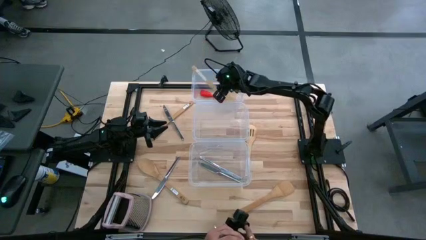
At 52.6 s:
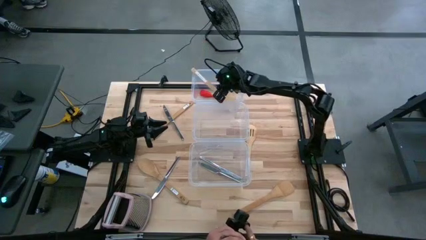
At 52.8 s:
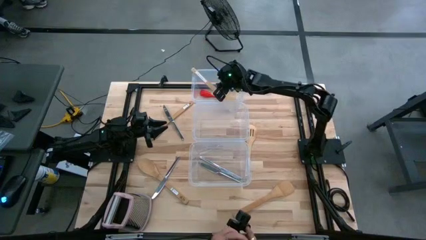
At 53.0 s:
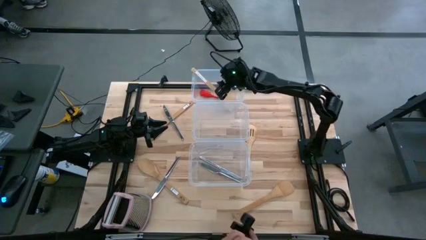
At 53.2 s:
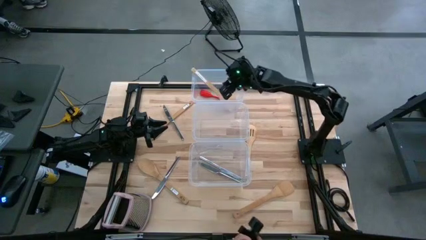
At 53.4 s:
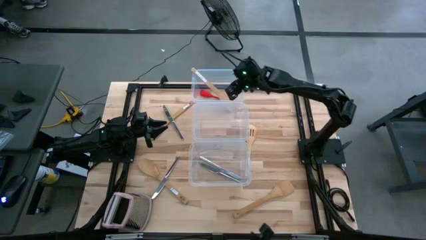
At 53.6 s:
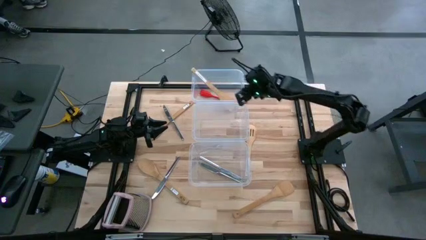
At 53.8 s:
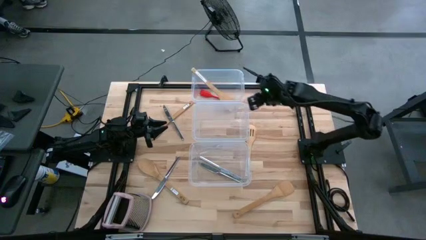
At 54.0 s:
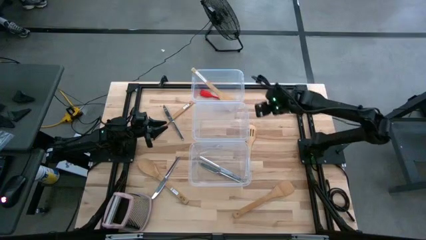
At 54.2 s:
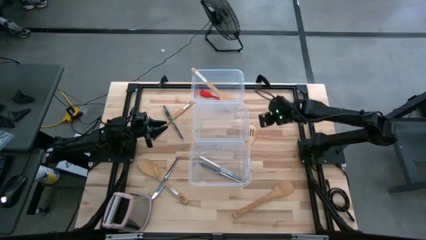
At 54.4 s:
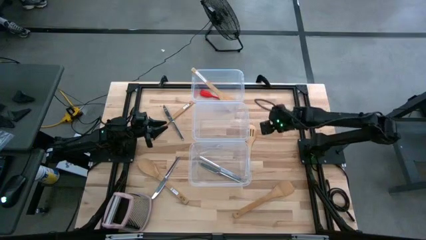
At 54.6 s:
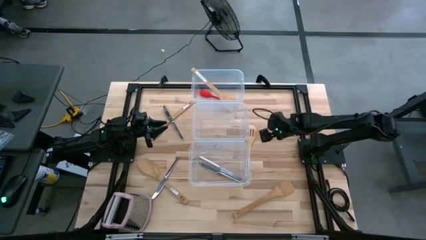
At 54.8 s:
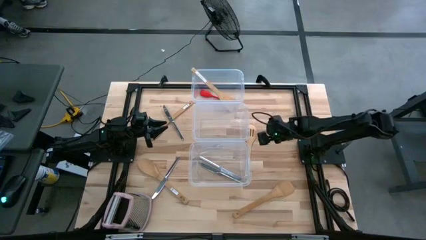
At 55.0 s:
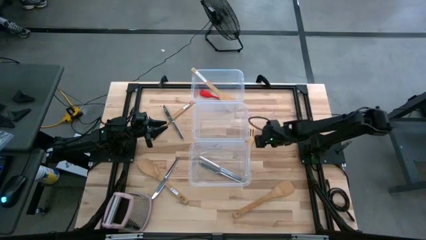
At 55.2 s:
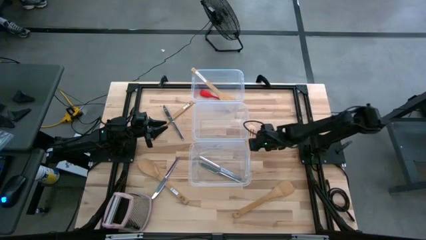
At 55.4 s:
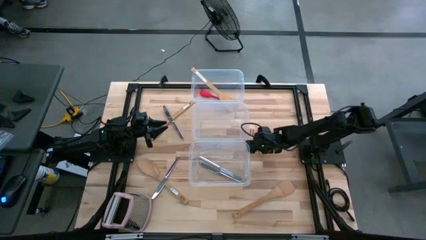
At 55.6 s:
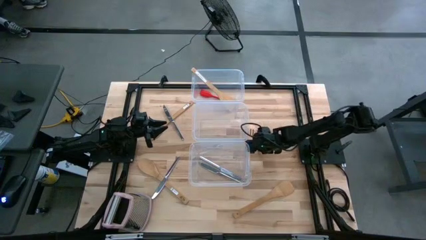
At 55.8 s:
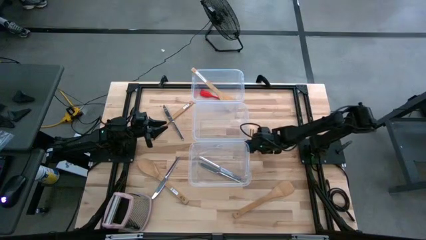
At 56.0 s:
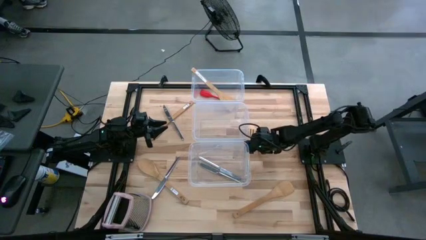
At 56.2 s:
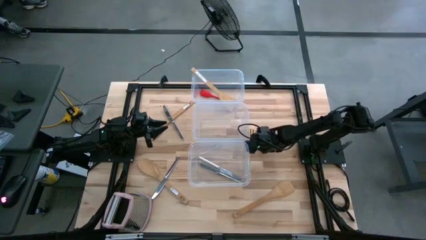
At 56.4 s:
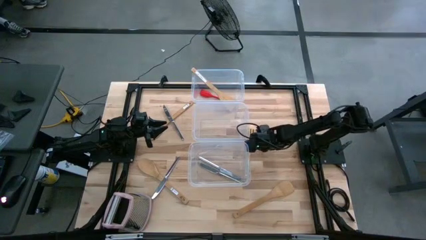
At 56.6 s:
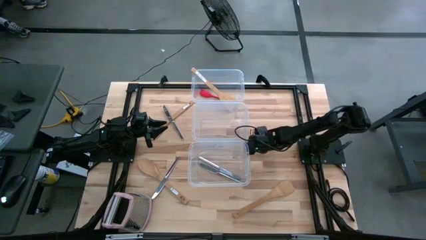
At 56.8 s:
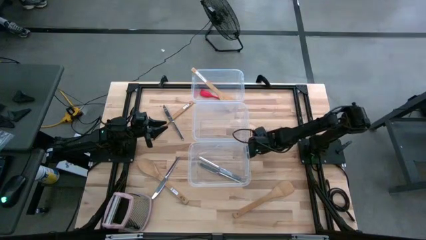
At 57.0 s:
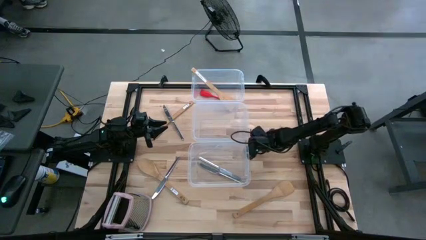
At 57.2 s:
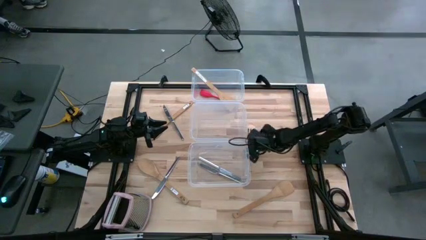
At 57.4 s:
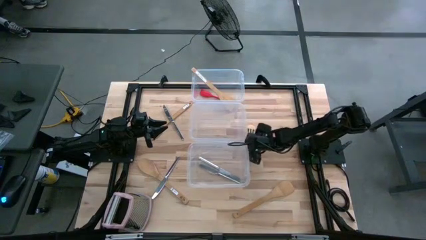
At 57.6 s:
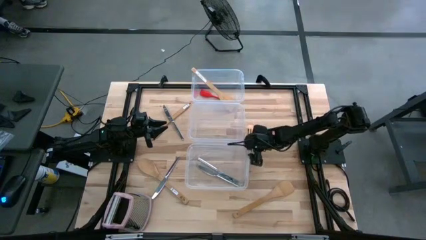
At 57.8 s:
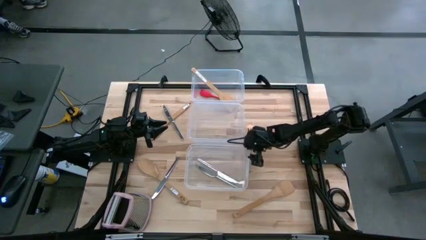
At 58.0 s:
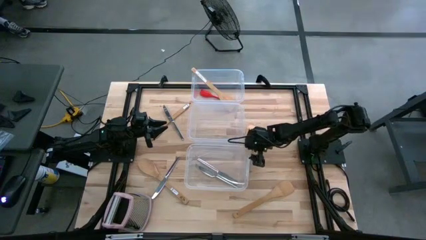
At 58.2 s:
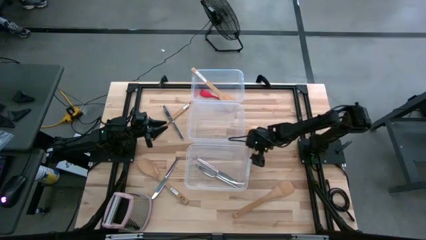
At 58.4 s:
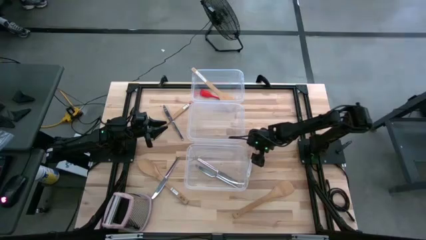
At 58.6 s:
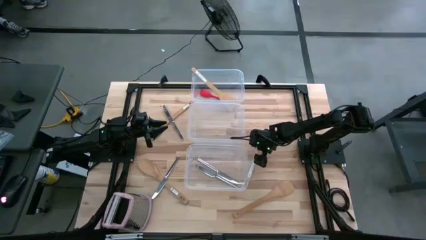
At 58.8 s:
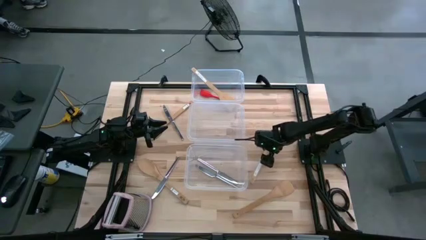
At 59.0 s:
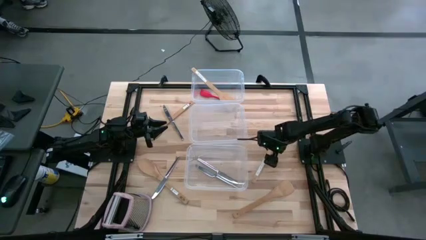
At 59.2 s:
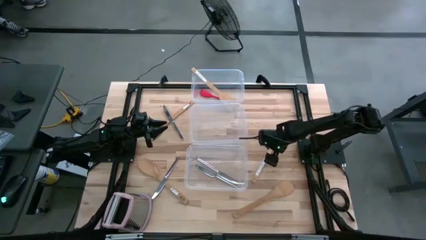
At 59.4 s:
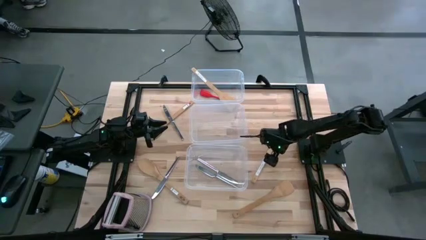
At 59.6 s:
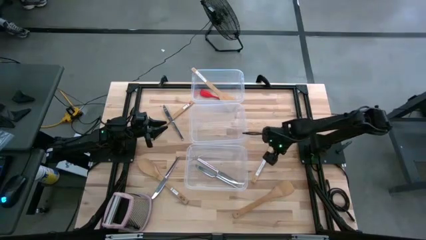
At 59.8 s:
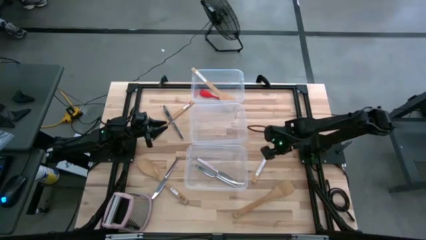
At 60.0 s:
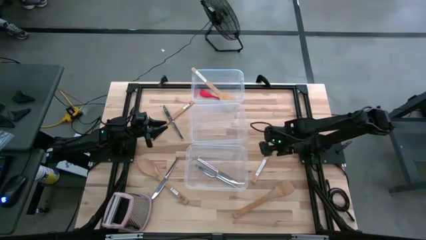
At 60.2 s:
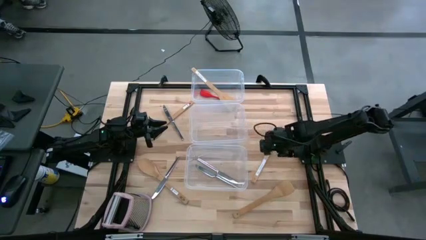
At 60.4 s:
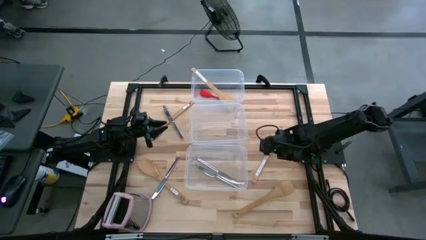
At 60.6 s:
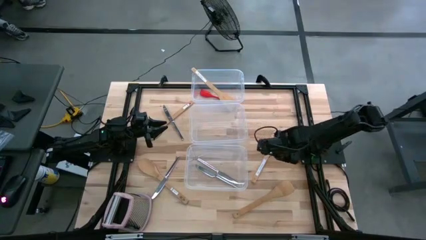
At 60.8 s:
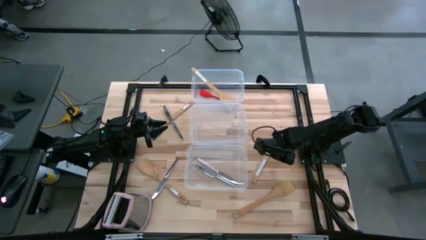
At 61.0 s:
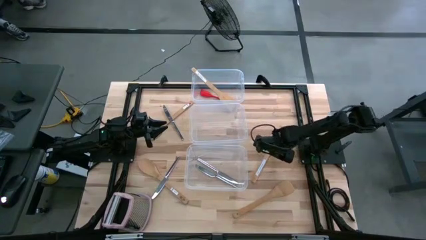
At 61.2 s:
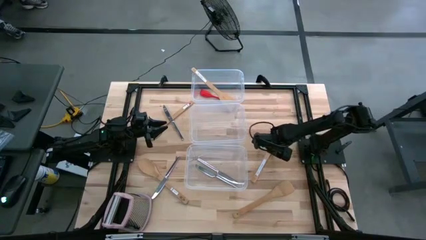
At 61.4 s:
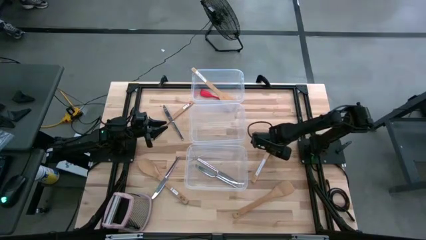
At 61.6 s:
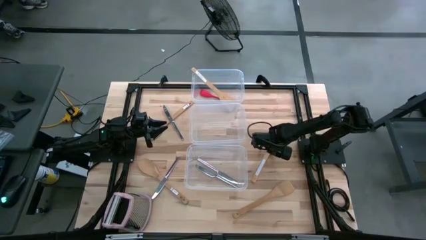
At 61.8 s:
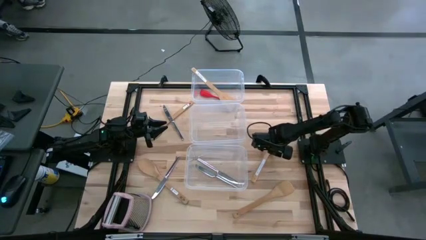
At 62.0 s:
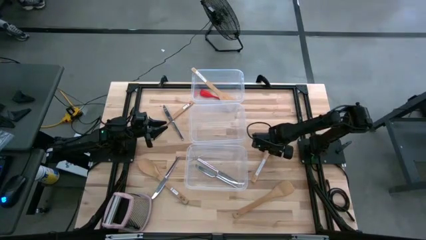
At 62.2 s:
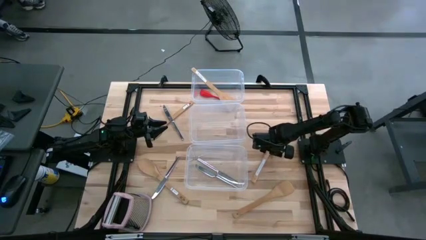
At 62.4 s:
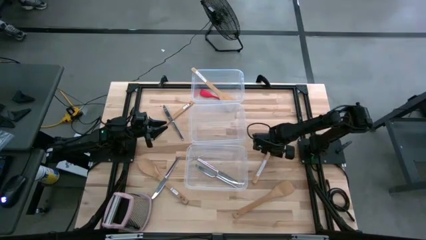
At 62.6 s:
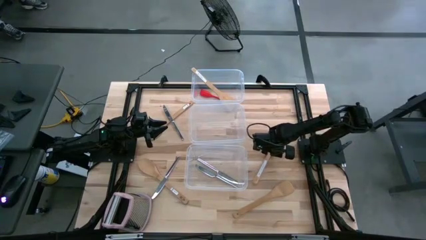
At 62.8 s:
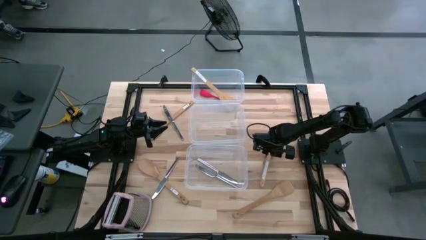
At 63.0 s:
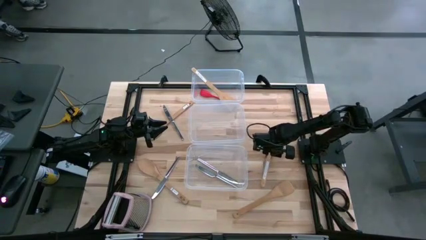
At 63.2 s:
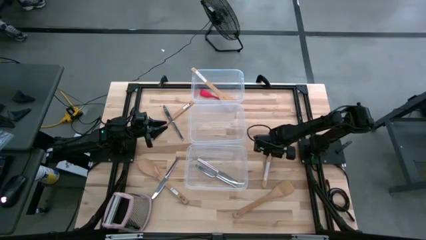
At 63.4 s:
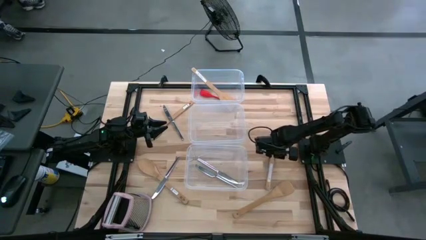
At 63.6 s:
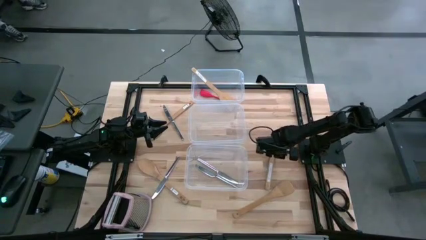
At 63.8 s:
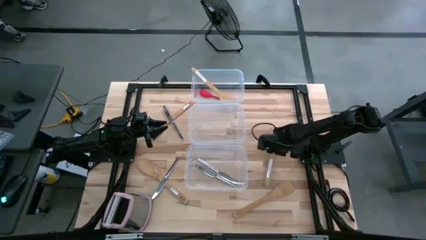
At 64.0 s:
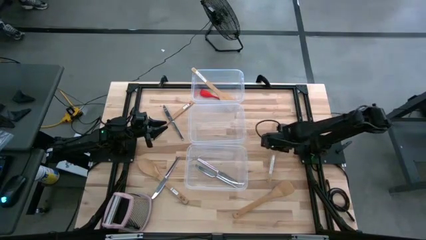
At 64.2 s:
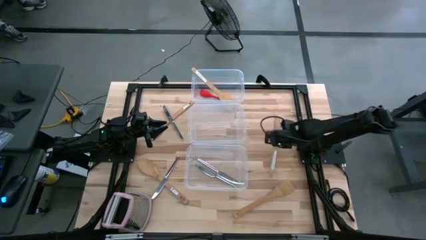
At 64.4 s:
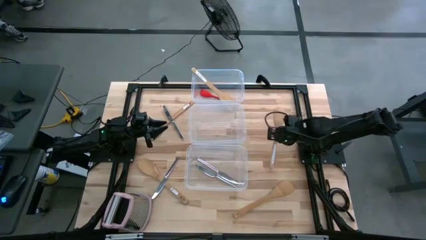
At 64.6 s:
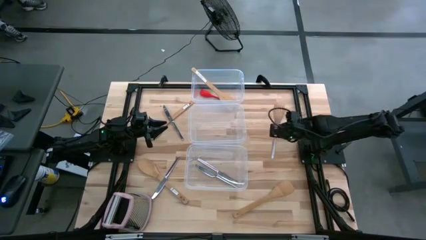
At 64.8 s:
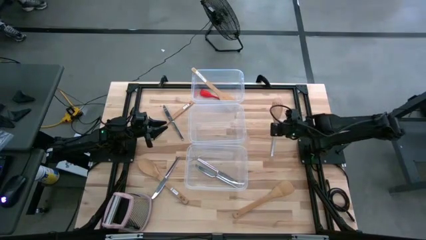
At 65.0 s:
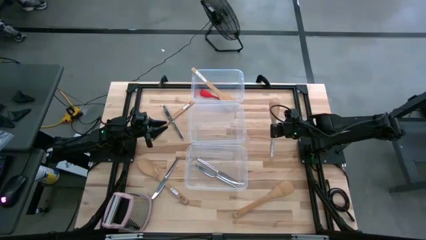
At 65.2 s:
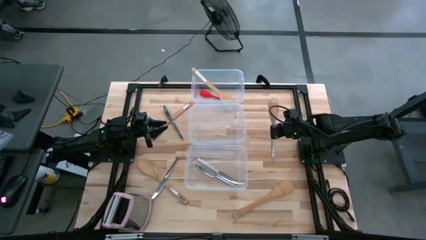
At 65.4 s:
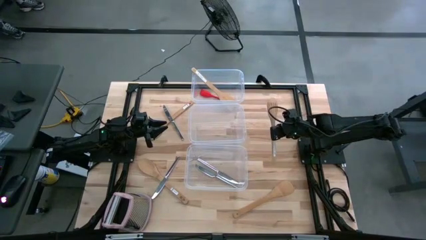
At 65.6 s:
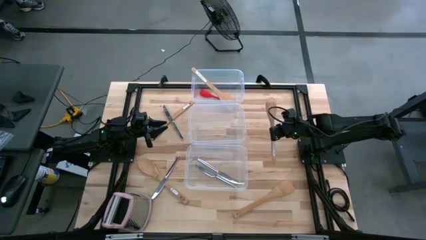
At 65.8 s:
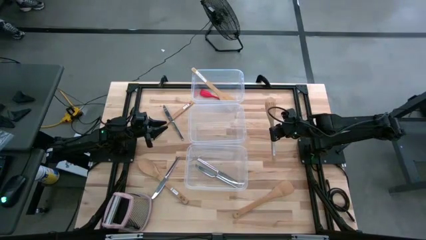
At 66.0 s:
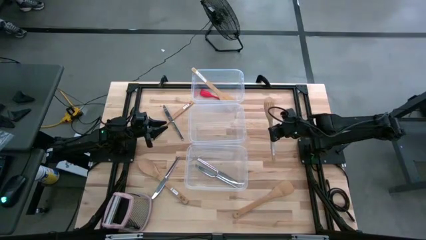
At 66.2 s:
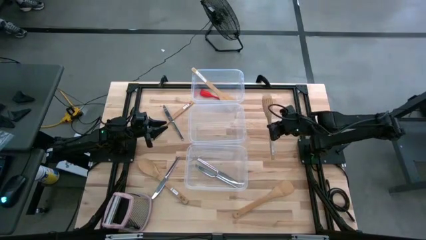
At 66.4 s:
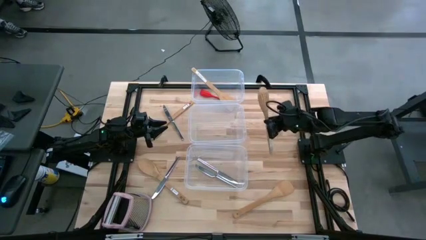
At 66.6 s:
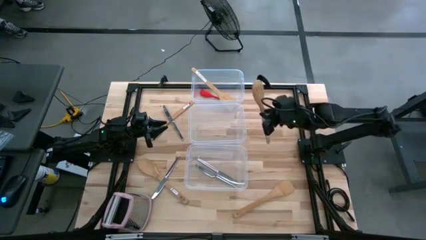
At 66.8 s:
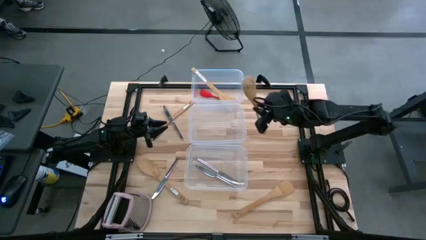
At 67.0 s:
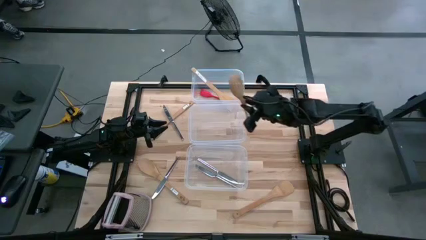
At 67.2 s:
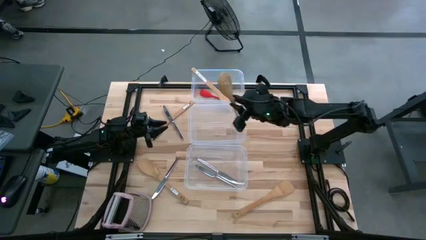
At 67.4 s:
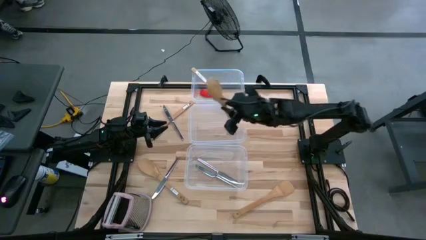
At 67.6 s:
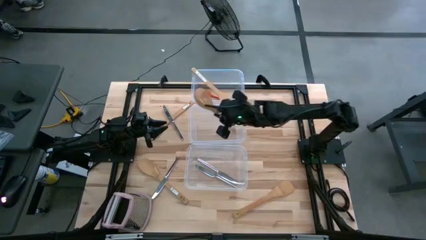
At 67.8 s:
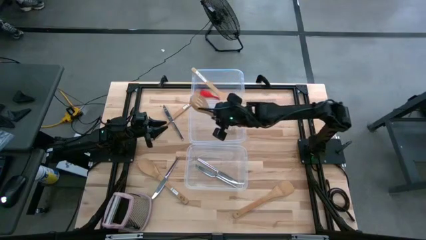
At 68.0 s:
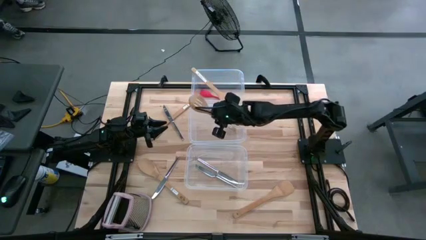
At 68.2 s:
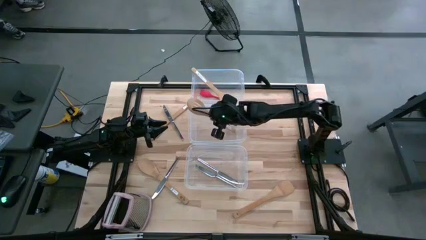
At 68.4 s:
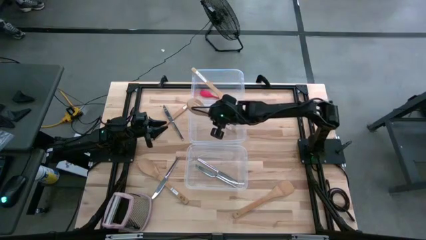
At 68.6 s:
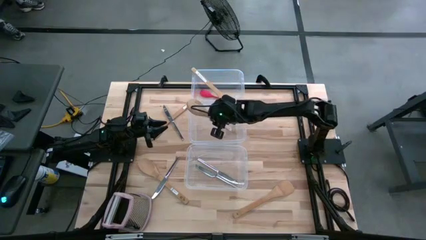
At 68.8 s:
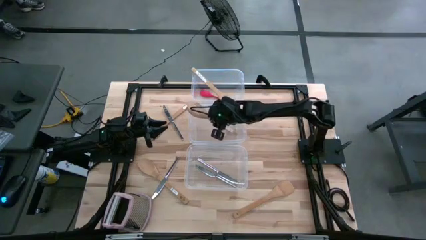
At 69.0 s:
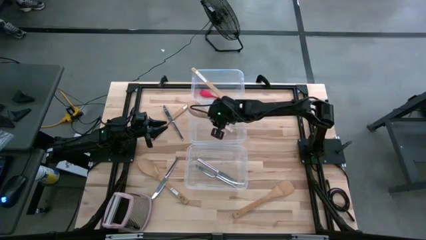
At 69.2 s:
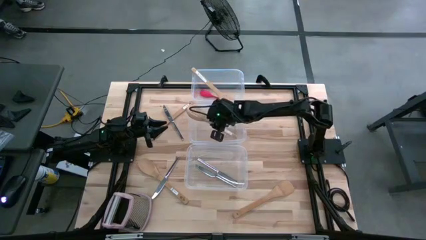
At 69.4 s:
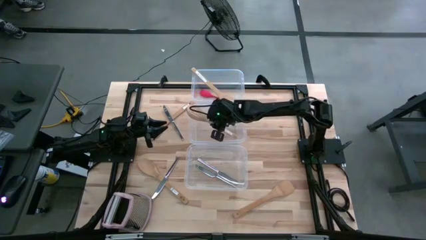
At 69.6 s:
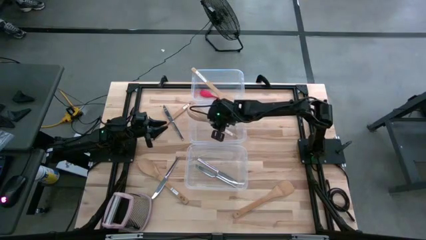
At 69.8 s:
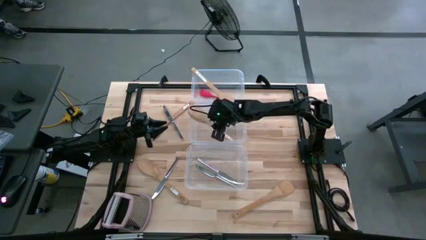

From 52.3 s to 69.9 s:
Task: Pick & Place Kitchen Items
Put the brown spatula into the middle transparent bin
